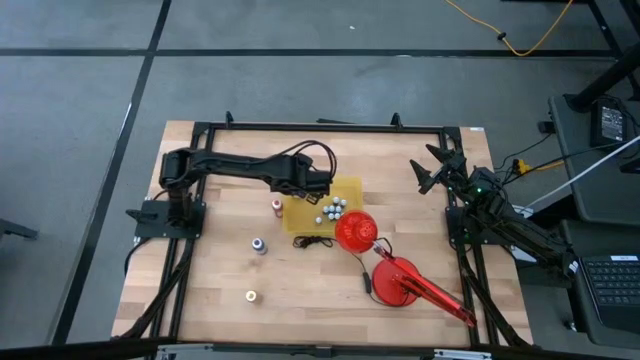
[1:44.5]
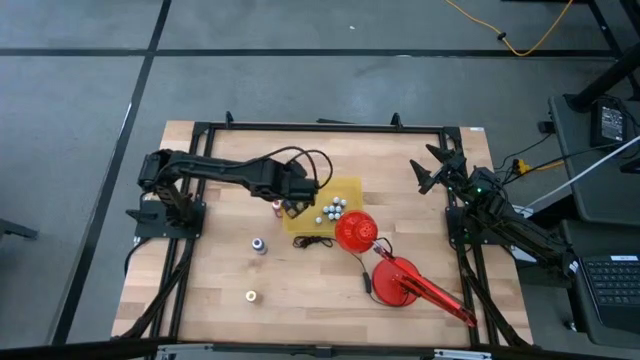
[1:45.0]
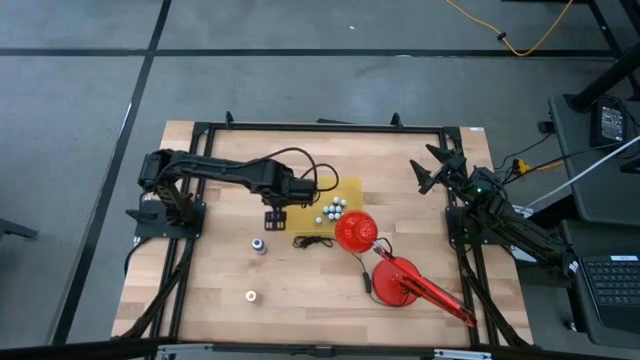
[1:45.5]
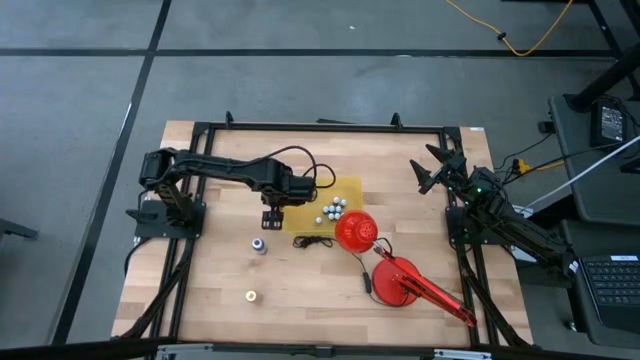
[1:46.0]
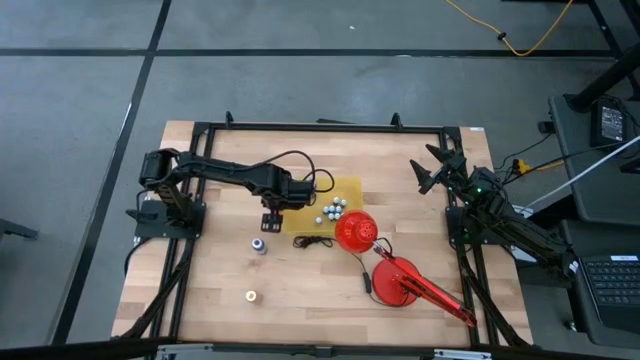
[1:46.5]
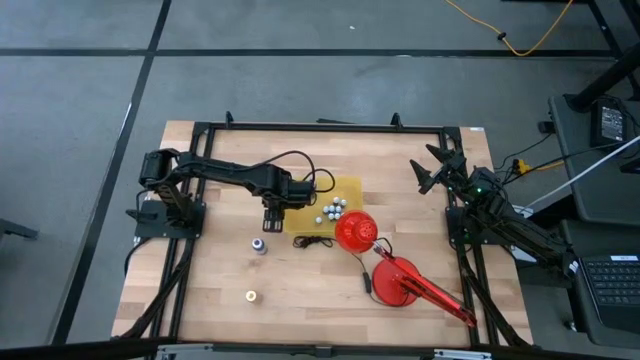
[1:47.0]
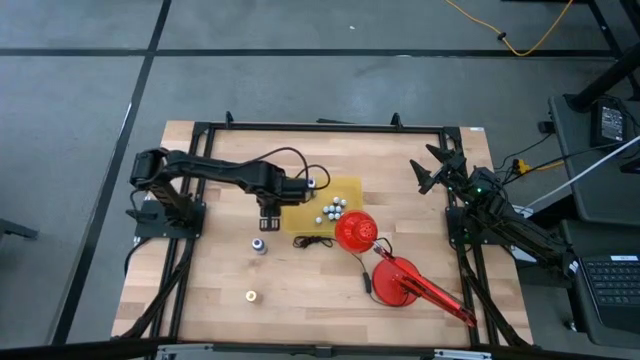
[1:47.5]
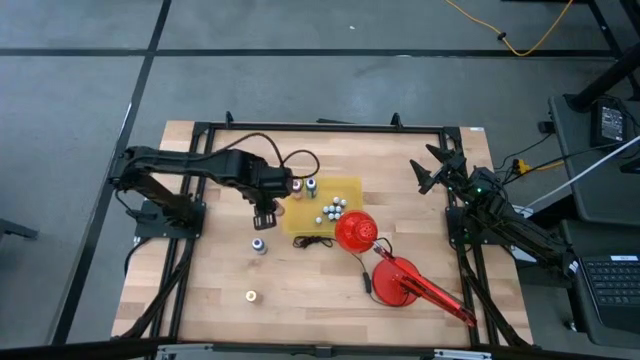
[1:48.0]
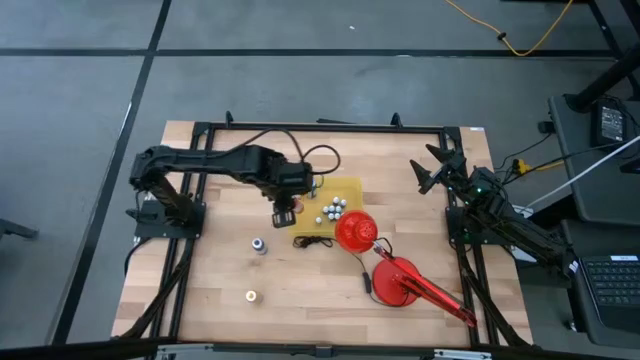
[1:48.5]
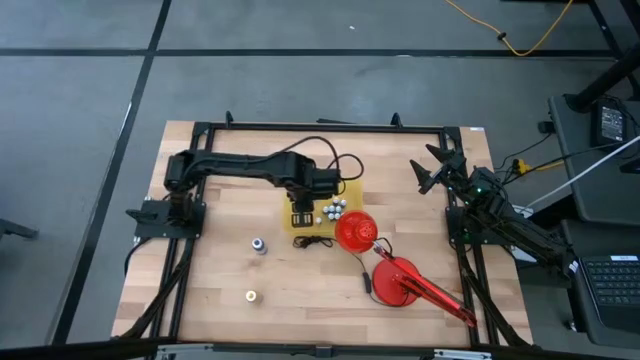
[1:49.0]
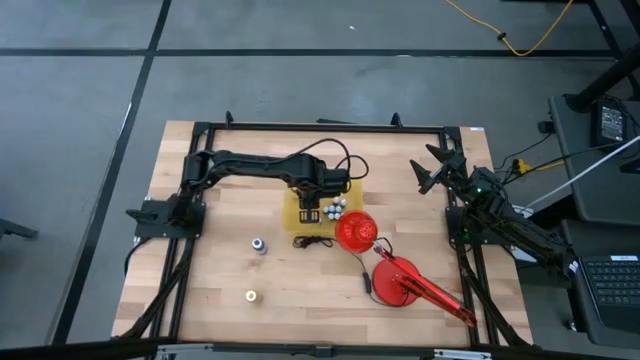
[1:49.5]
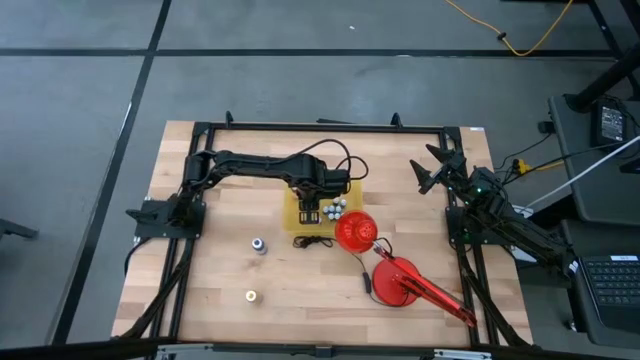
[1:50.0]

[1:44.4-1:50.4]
Task: Pick & Place food coloring
Put the large orange food coloring bottle into the yellow container

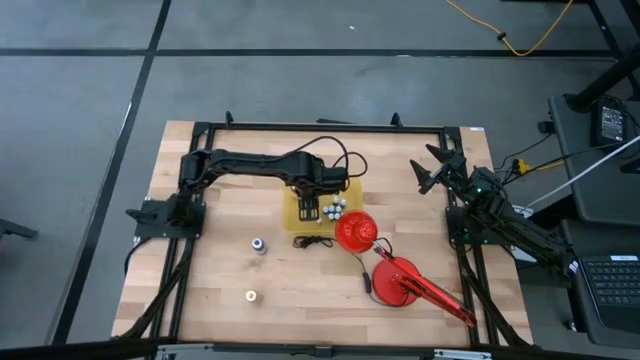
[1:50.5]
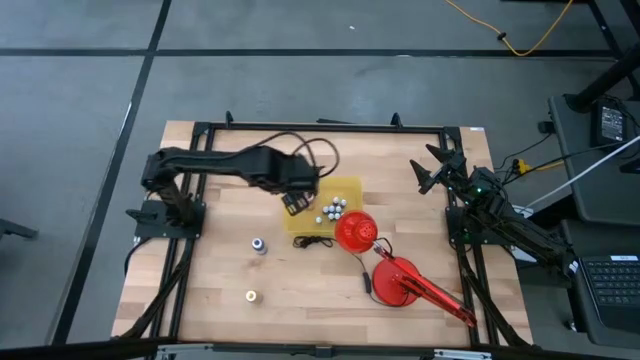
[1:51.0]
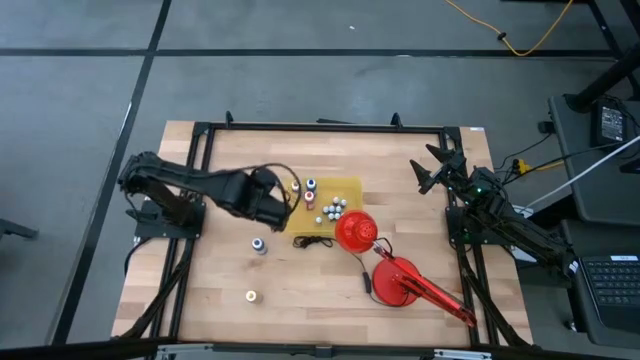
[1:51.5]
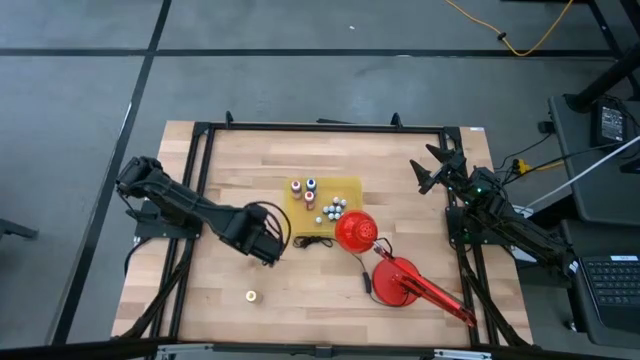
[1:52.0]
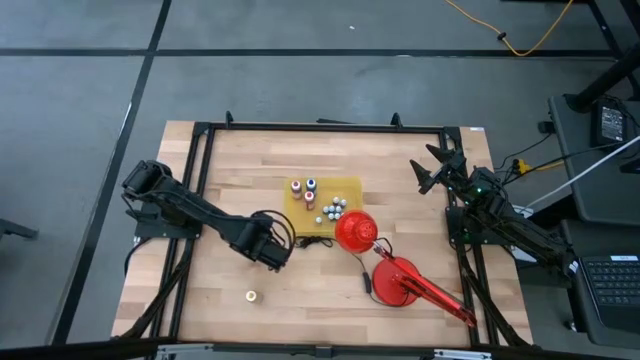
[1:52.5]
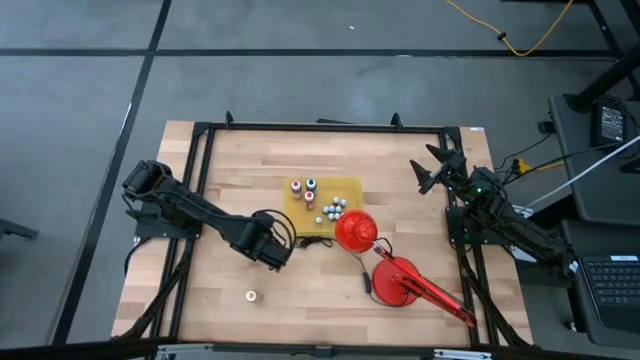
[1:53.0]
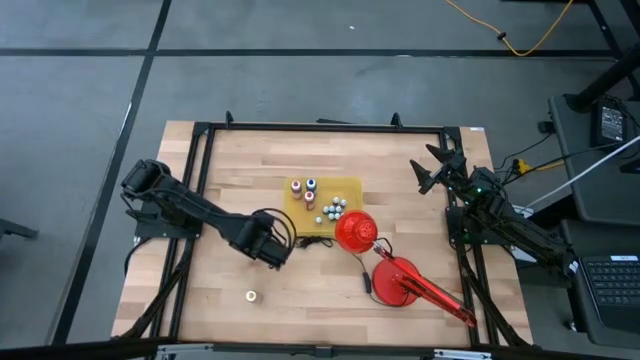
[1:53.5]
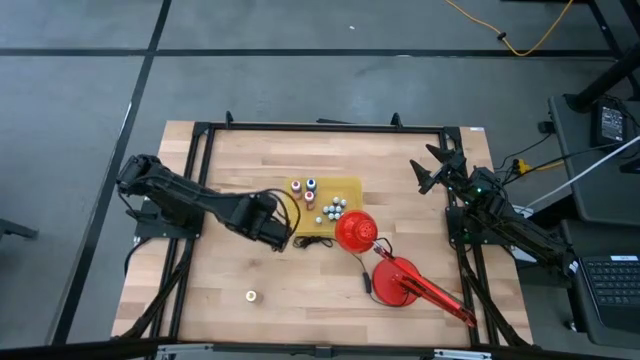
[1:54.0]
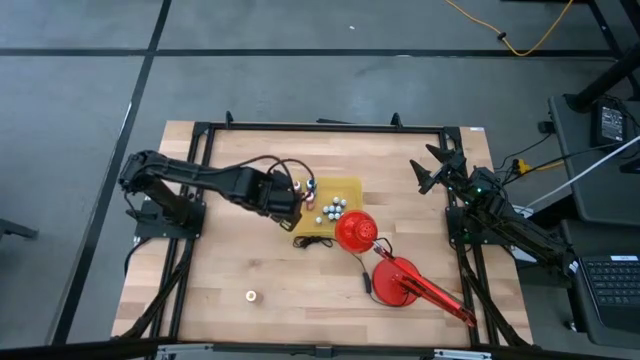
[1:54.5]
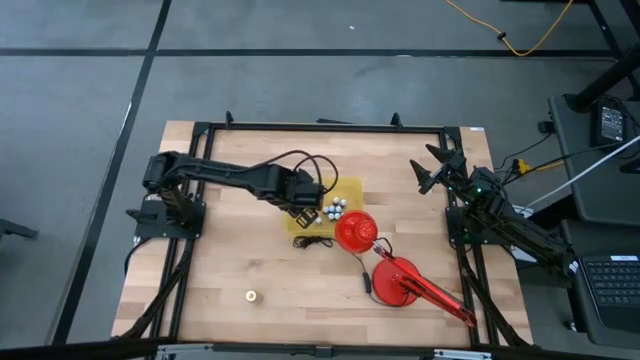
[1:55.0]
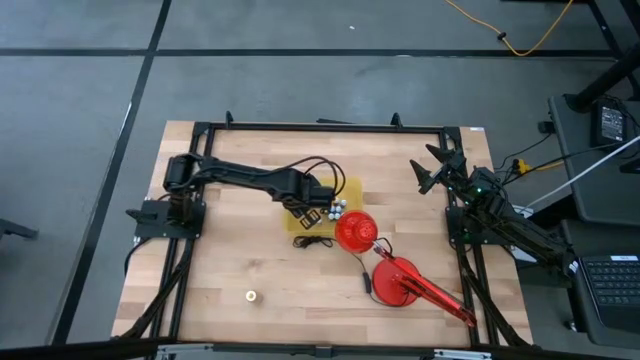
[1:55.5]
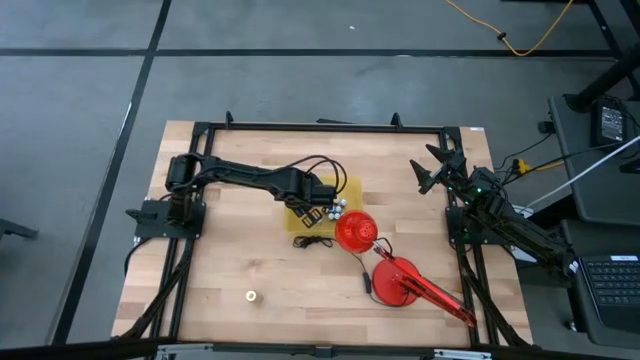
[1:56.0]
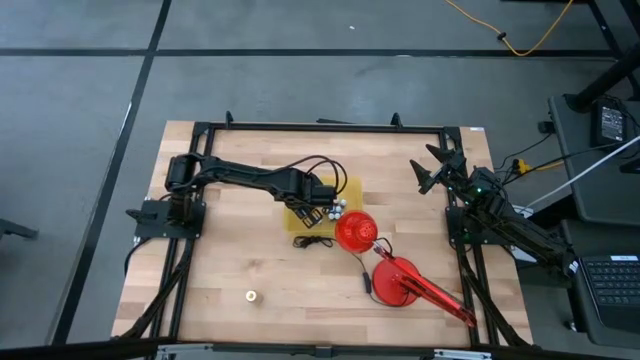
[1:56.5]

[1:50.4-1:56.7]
Put the large purple food coloring bottle into the yellow container

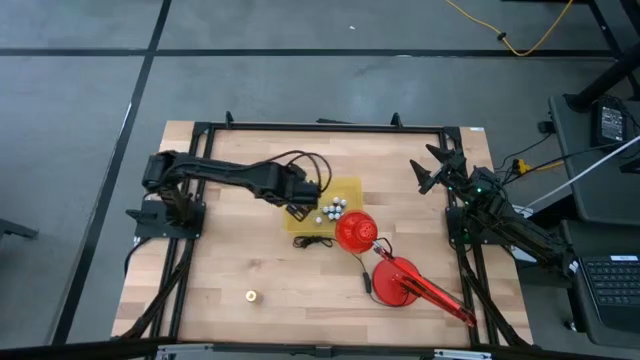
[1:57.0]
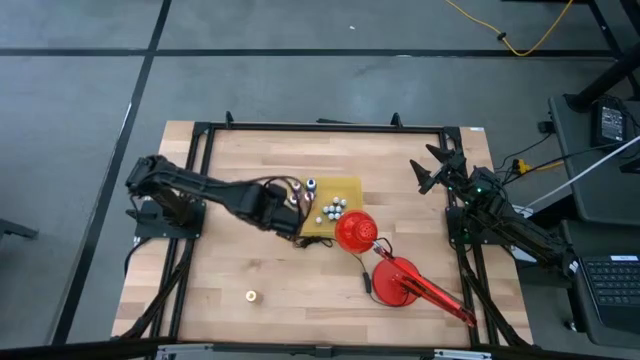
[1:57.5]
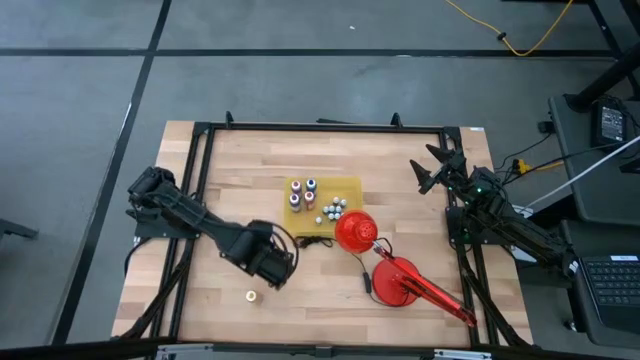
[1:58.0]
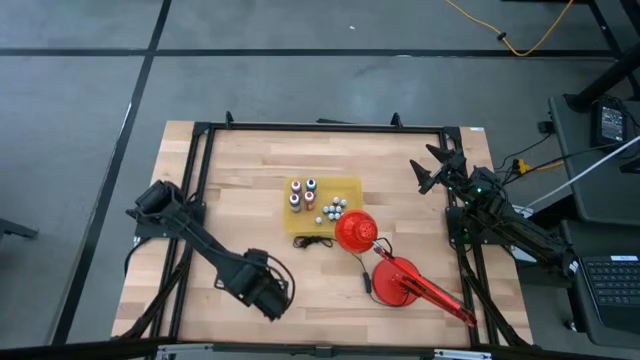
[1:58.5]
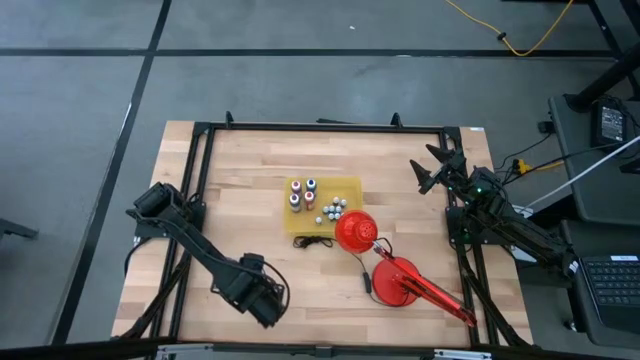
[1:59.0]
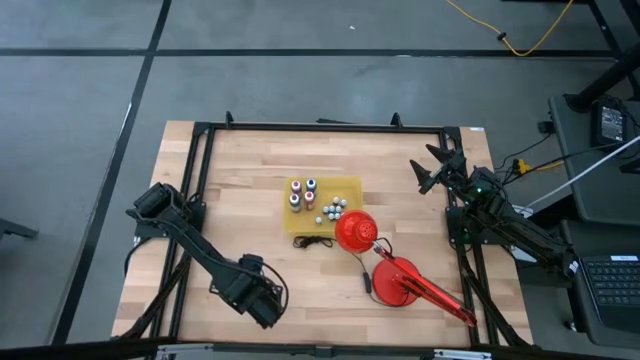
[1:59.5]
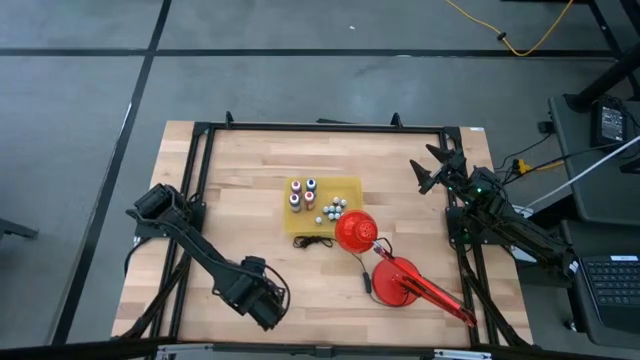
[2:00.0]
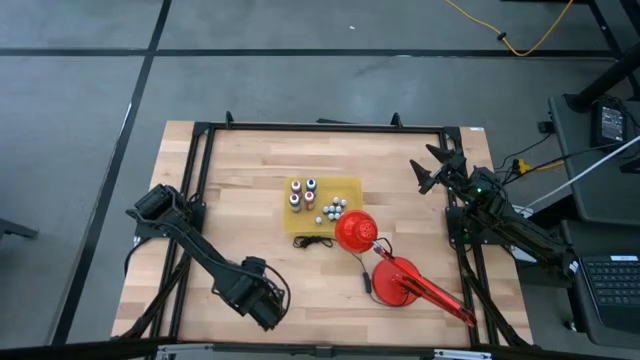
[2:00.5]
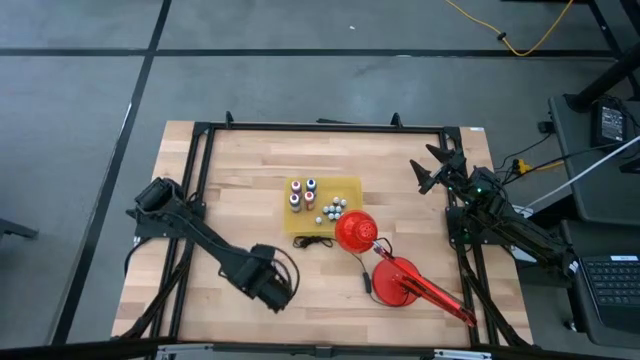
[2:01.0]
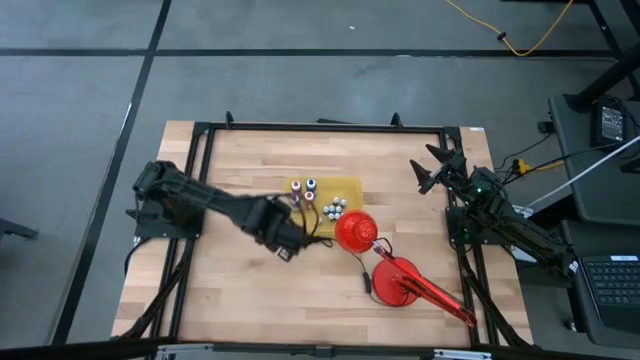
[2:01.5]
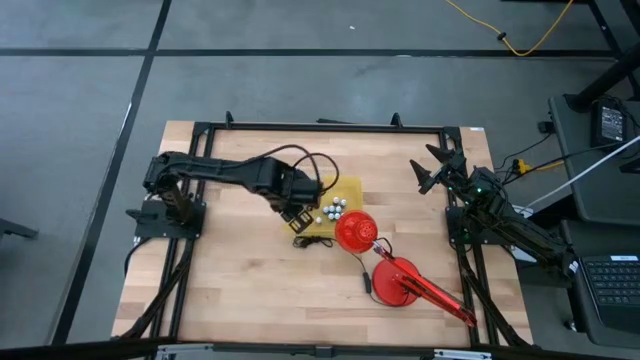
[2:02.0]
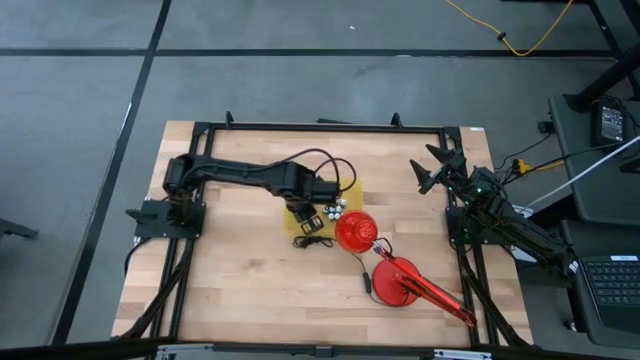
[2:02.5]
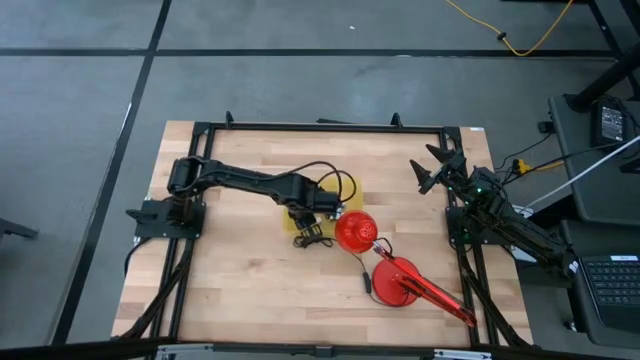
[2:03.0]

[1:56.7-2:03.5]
Put the large yellow food coloring bottle into the yellow container

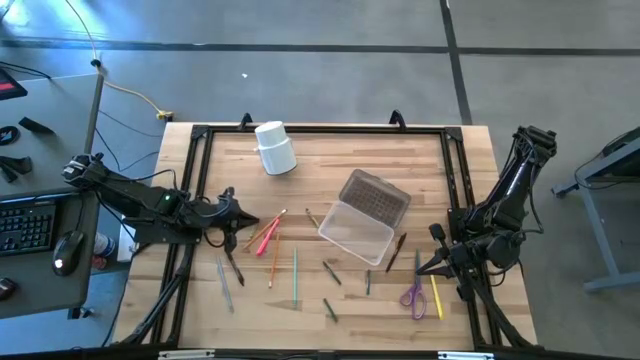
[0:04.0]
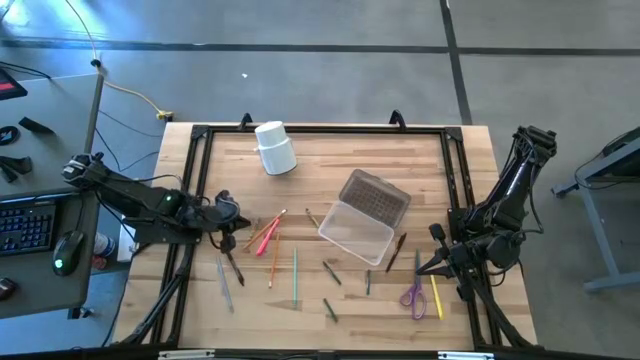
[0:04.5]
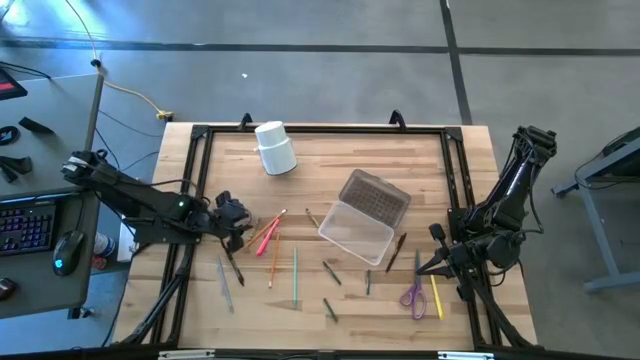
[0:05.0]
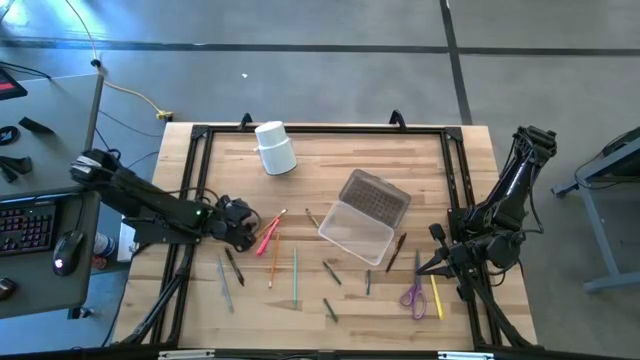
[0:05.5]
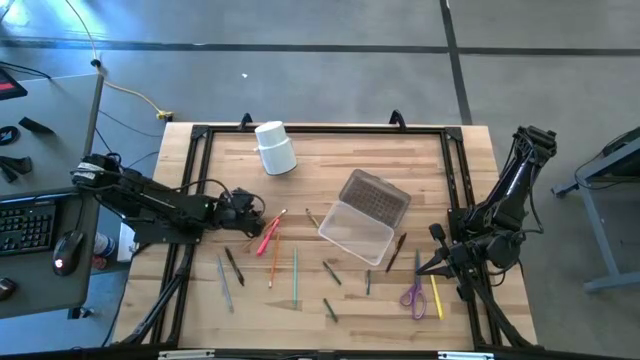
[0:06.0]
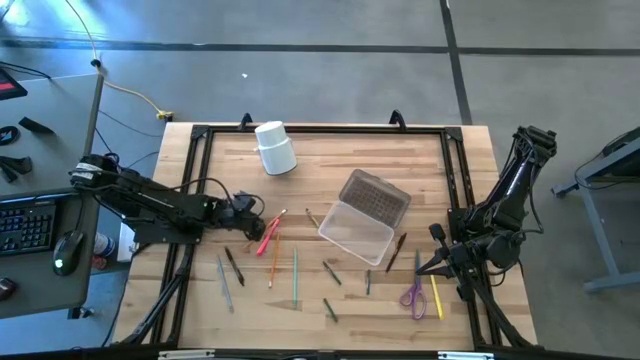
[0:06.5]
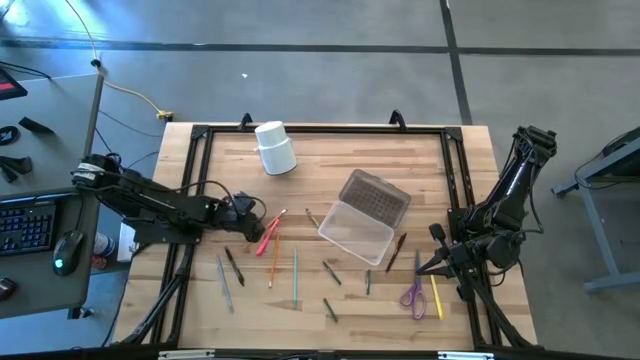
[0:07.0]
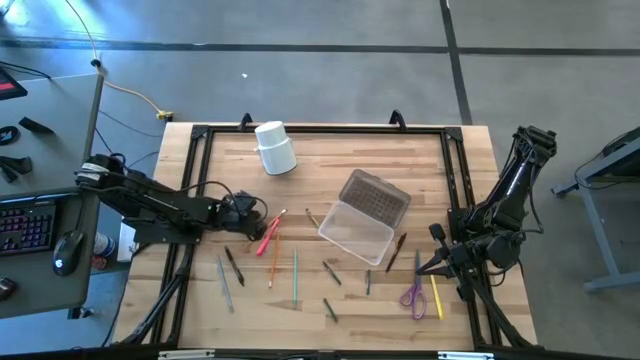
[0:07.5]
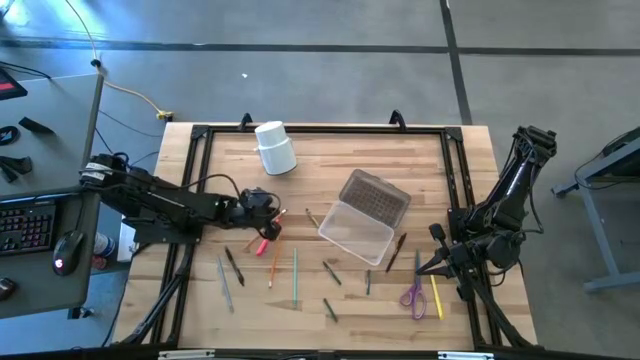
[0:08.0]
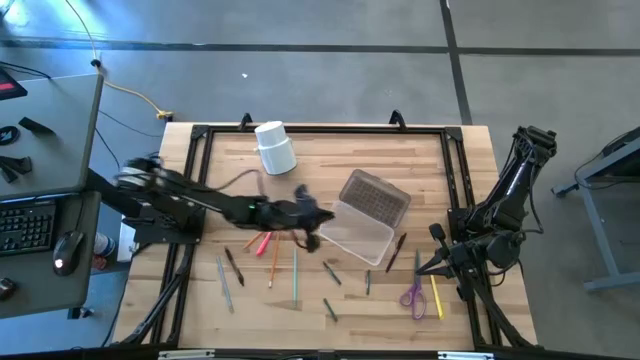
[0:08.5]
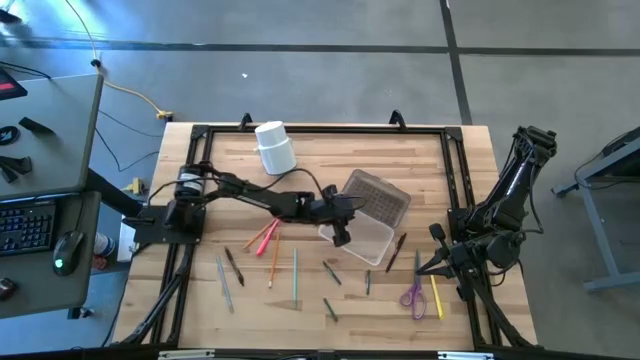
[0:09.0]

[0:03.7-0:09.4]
Task: Pick & place school supplies into a supply box
Put the left green crayon into the supply box
